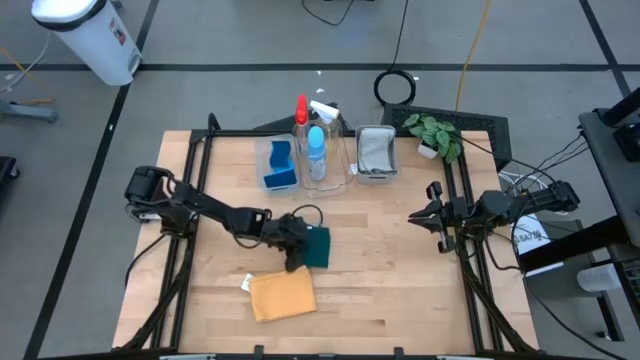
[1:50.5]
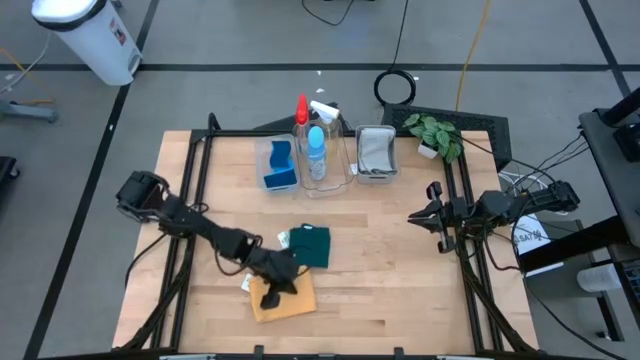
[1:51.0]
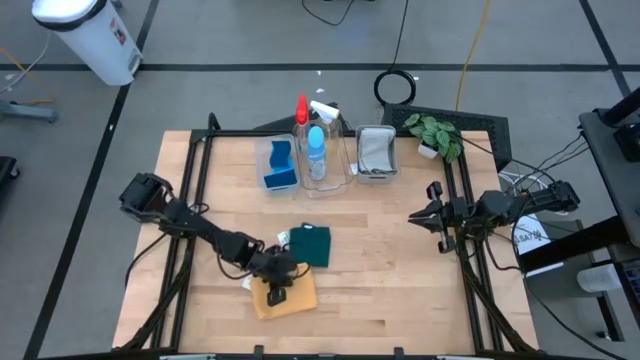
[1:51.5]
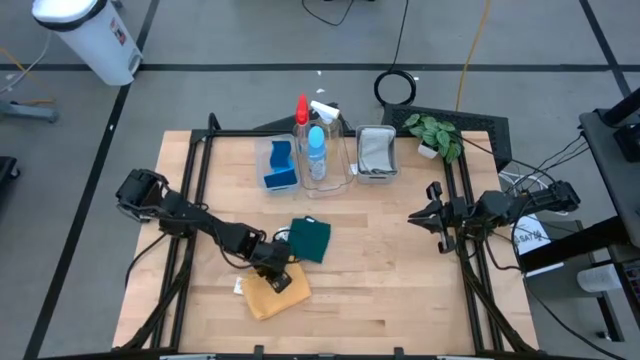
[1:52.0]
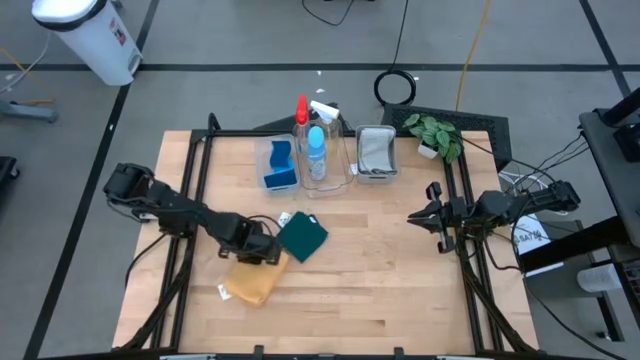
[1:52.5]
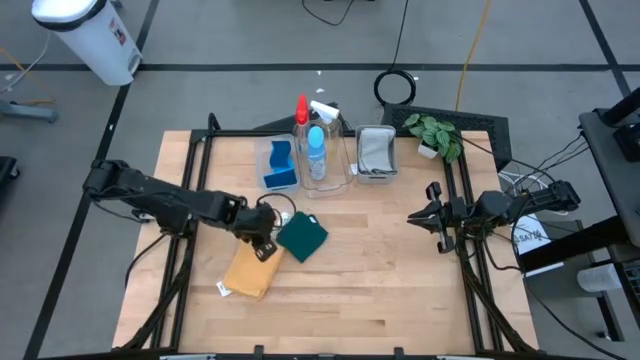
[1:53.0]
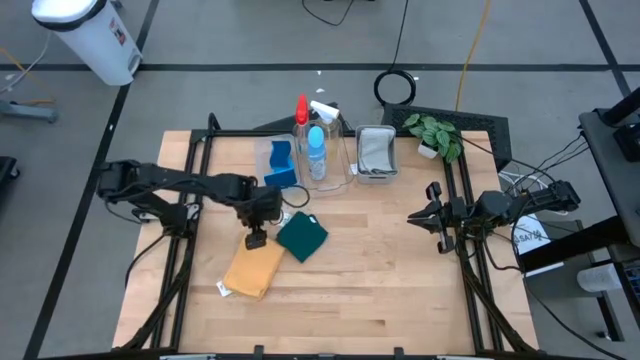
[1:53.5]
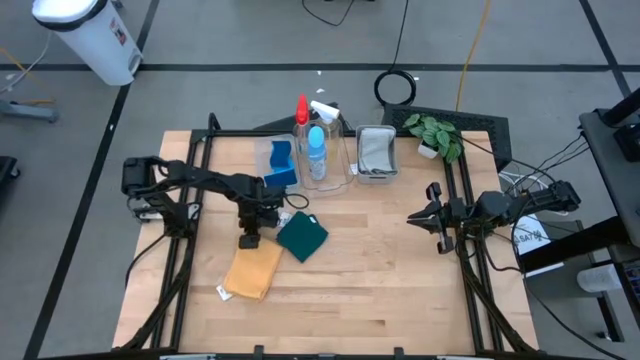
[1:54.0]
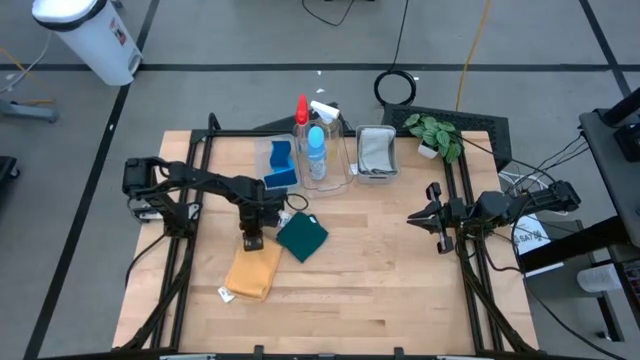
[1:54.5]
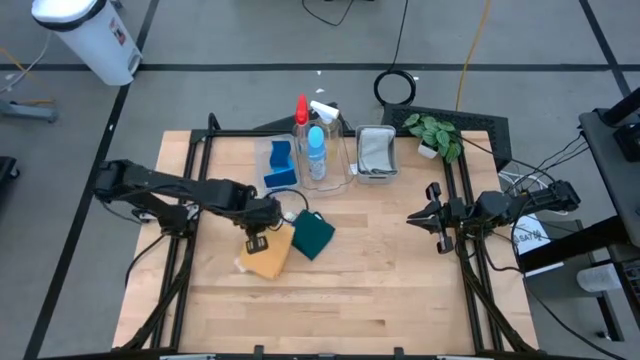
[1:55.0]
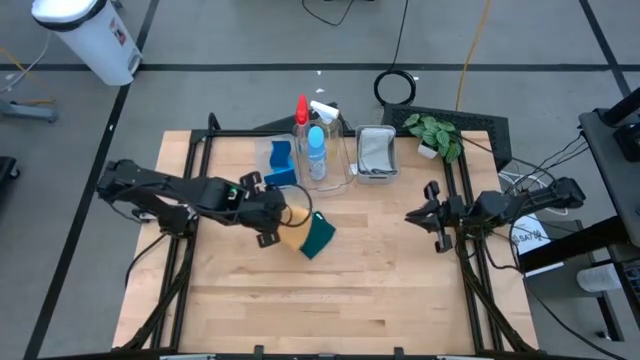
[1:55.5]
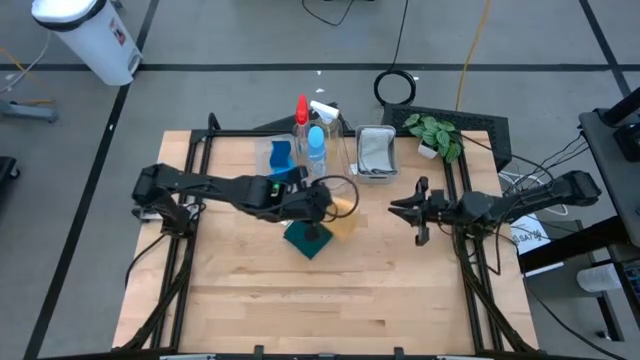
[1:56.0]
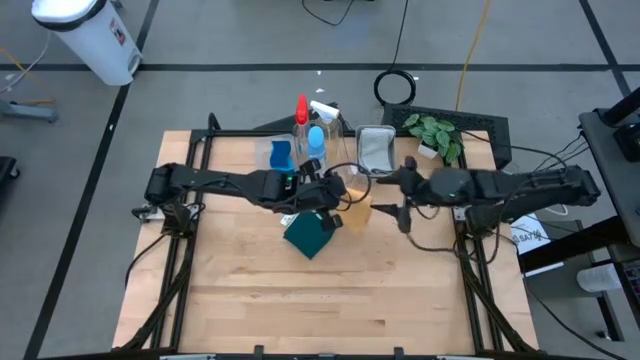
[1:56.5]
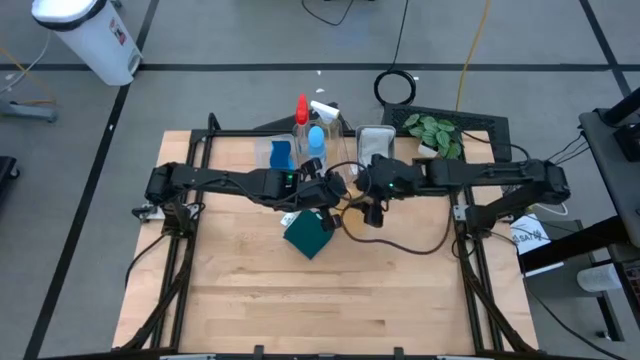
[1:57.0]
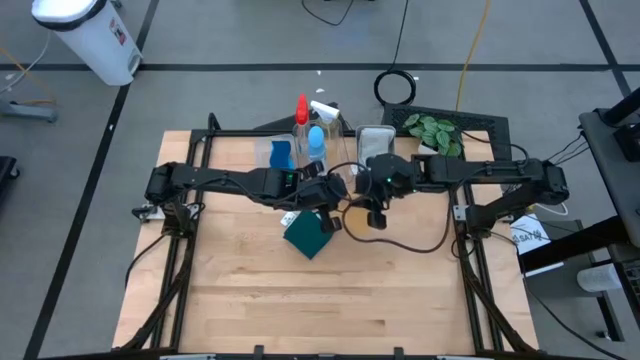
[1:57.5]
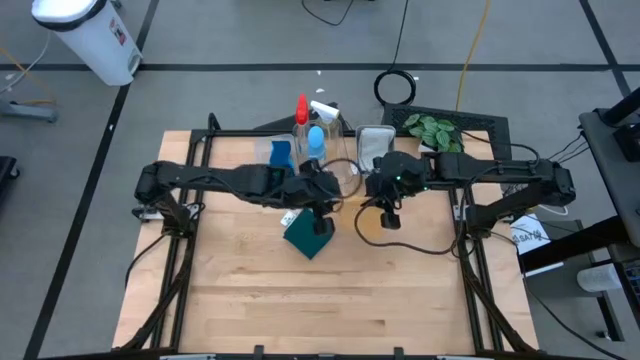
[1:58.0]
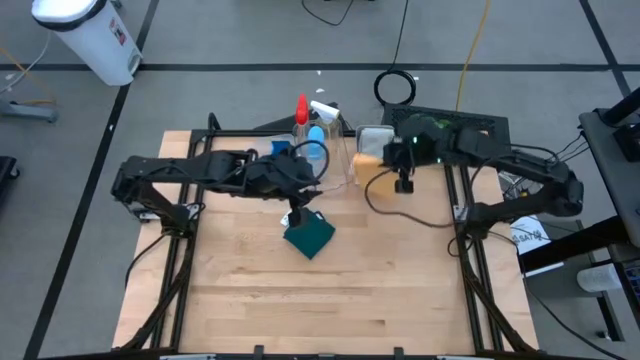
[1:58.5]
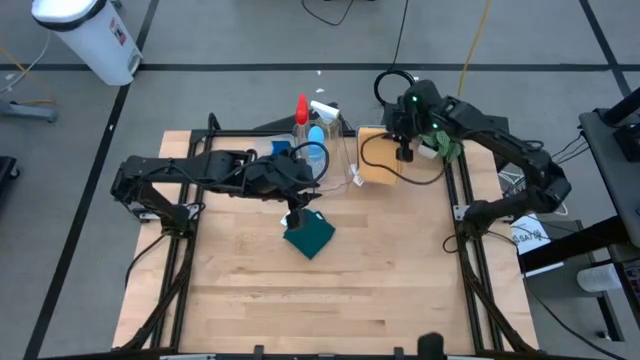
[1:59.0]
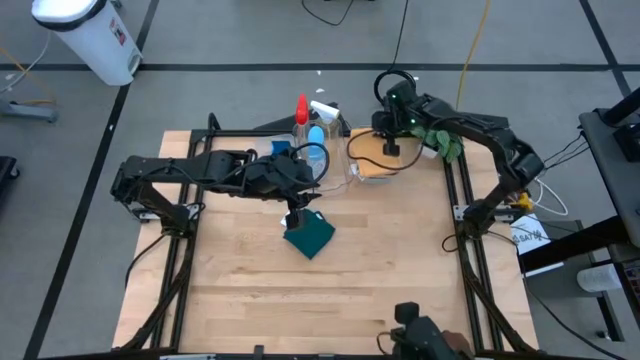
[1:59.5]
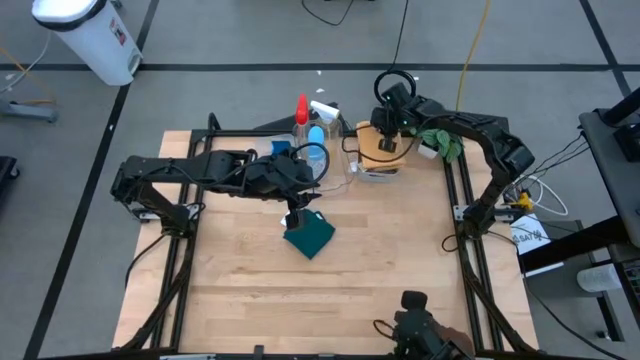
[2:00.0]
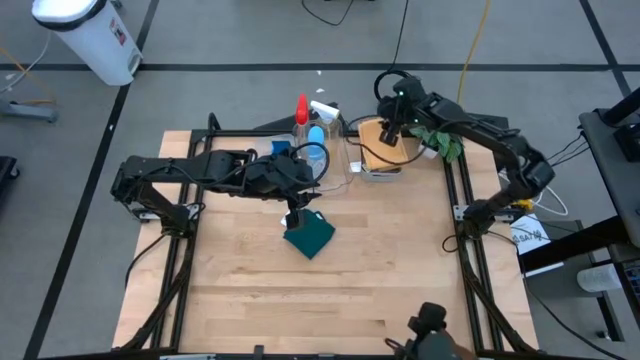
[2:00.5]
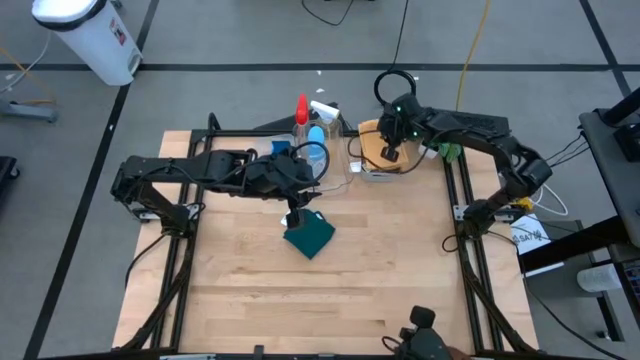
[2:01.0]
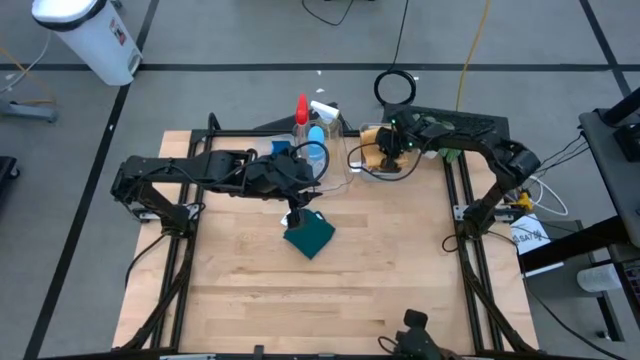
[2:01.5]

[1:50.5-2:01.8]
Task: Pick & Place Kitchen Items
Put the yellow microfiber cloth into the gray bin

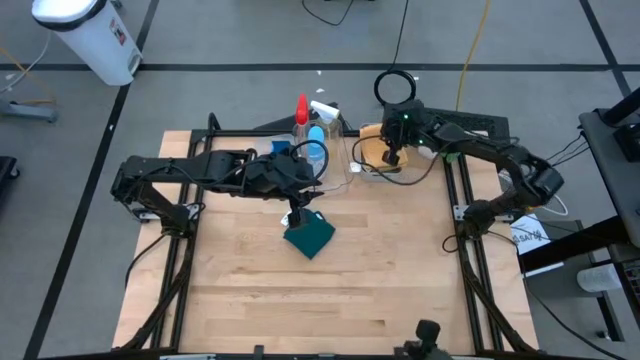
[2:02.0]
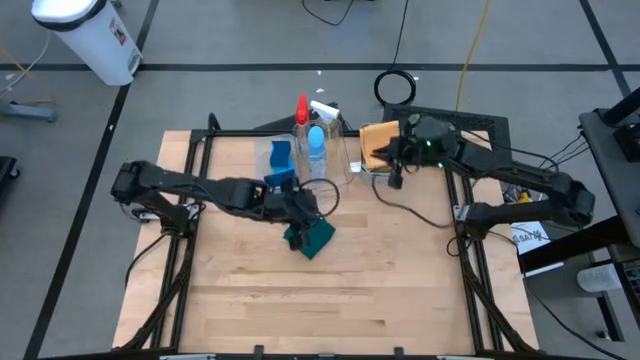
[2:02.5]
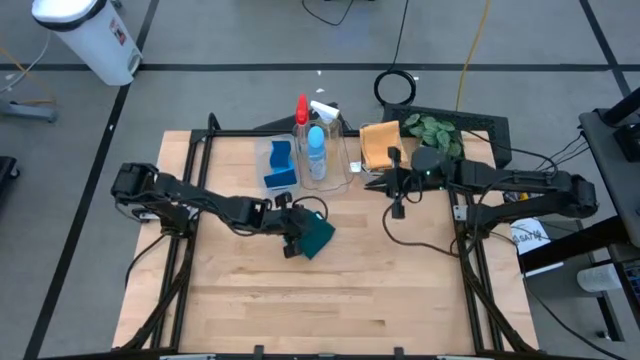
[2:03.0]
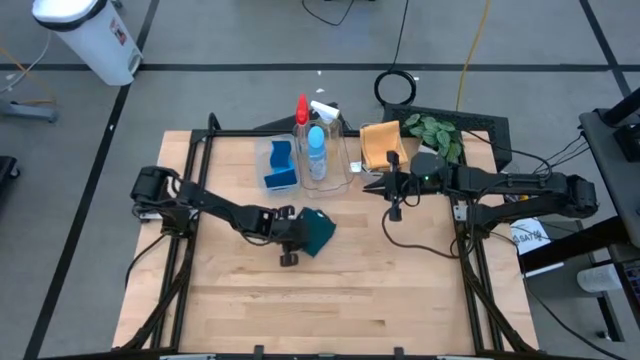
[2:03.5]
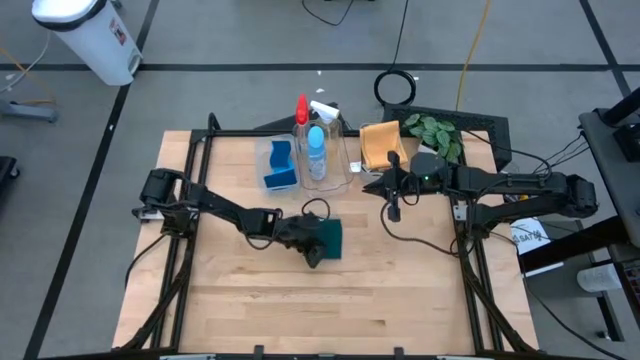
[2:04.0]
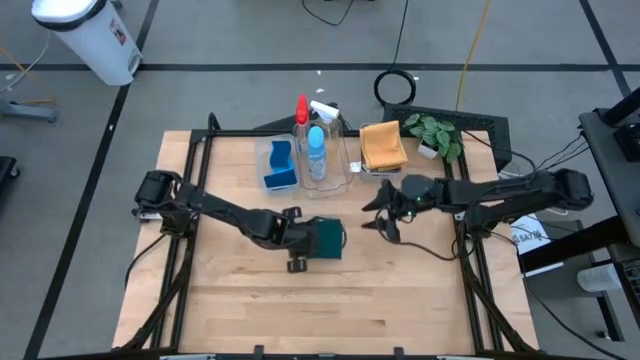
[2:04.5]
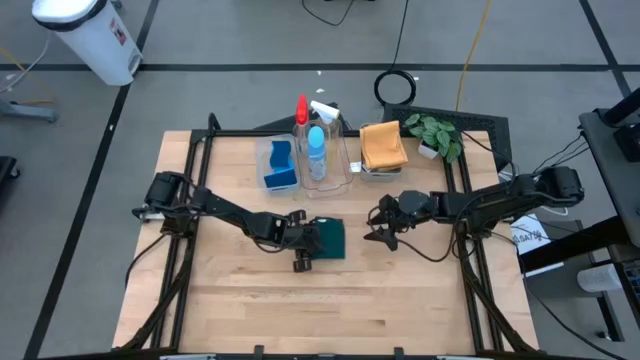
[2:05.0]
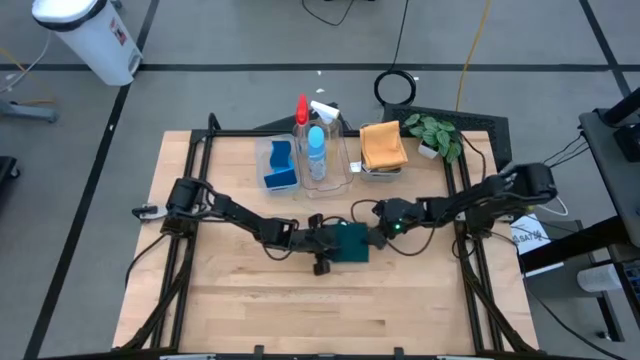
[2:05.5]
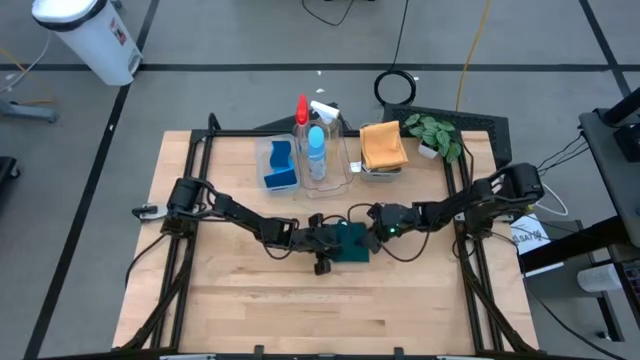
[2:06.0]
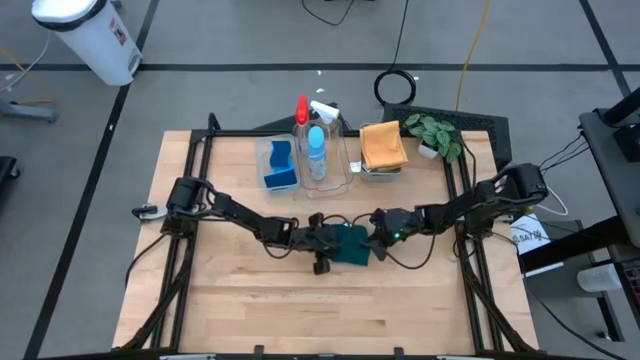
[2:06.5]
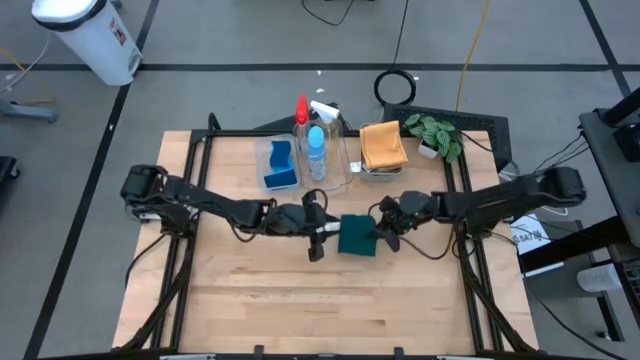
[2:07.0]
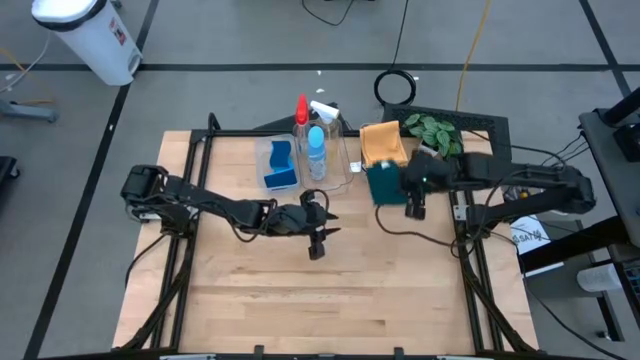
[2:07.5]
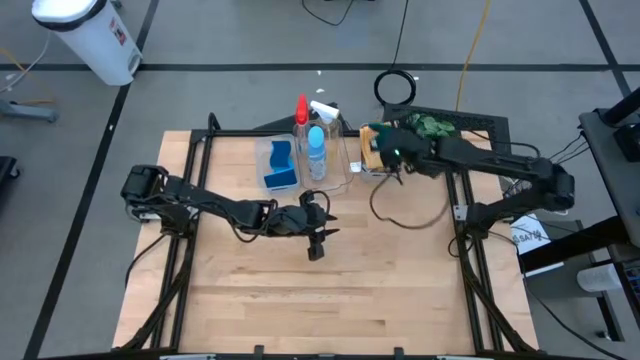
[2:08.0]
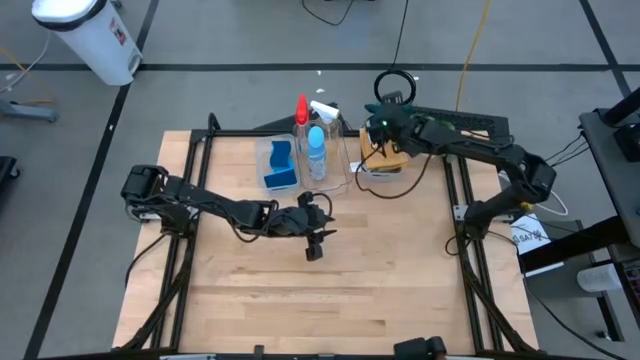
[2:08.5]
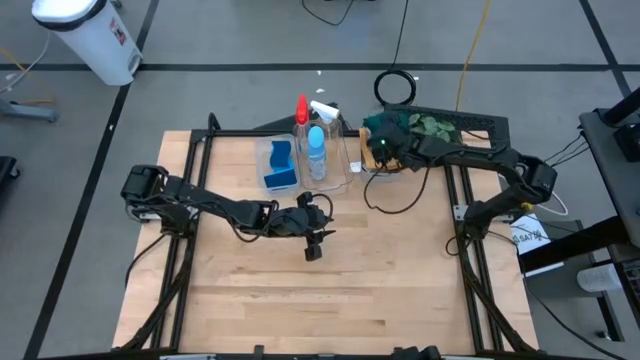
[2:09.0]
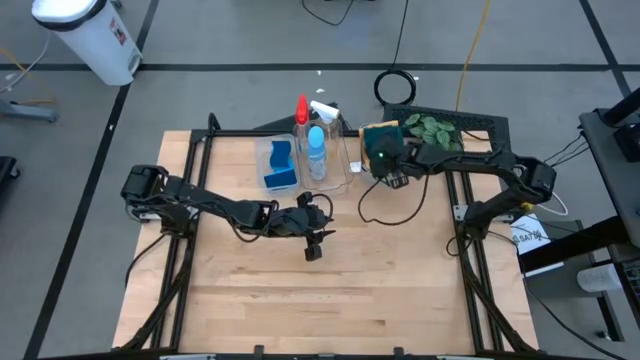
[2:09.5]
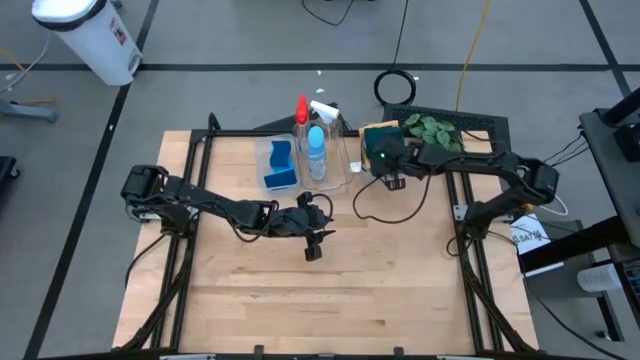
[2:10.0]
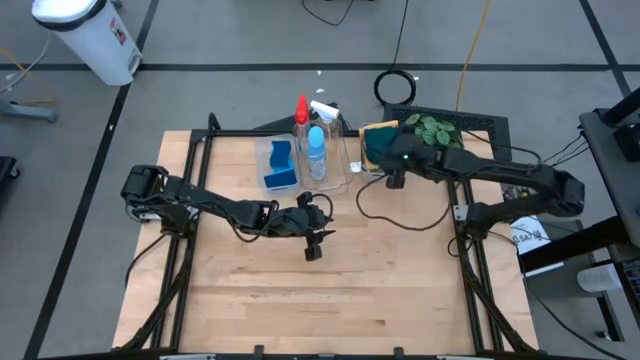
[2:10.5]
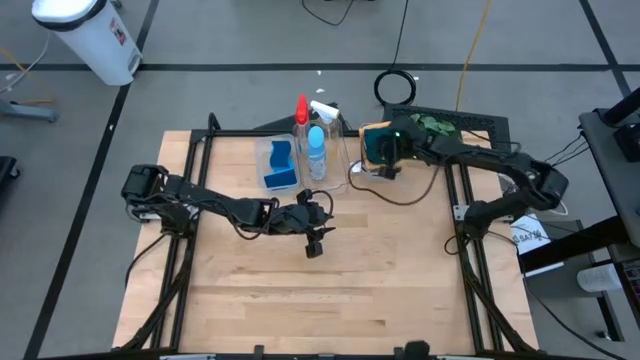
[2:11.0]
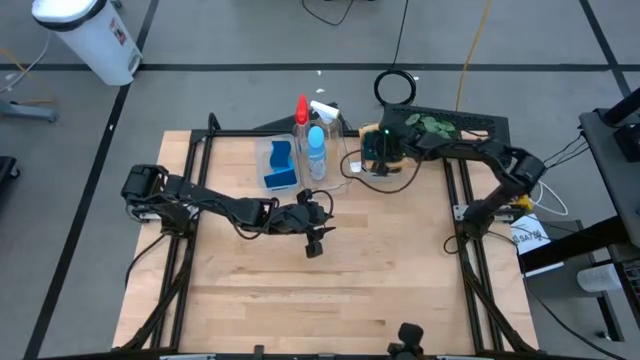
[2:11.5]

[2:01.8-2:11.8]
Put the dark blue microfiber cloth into the gray bin
